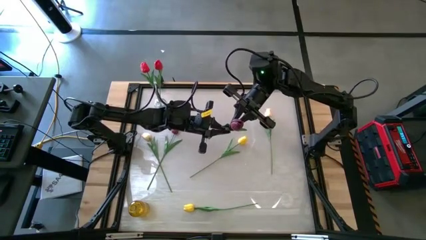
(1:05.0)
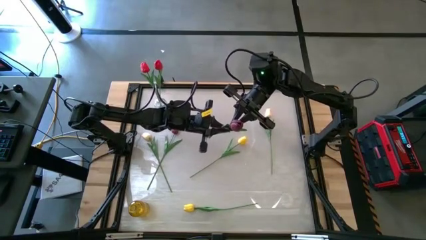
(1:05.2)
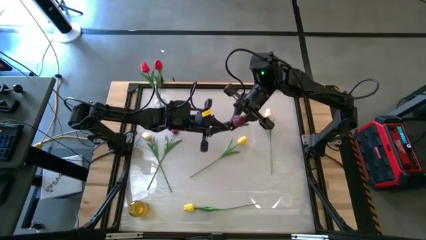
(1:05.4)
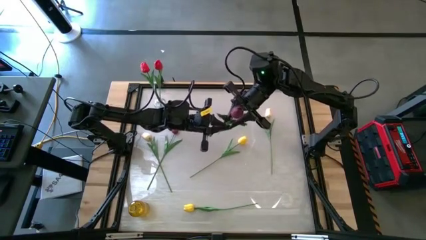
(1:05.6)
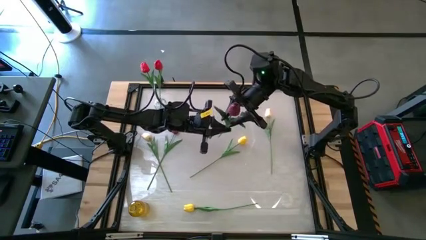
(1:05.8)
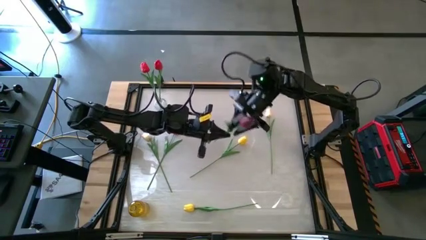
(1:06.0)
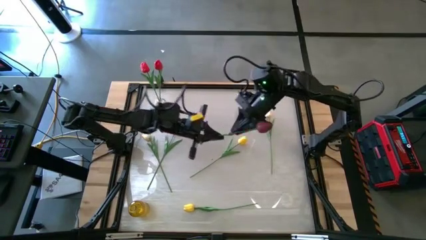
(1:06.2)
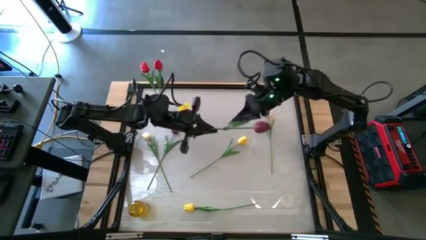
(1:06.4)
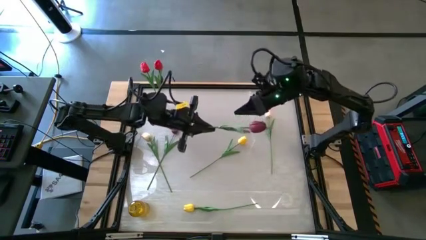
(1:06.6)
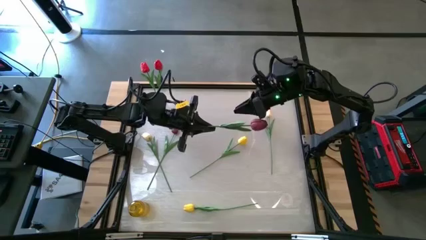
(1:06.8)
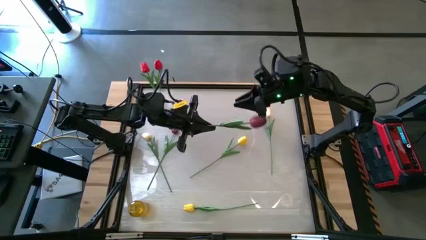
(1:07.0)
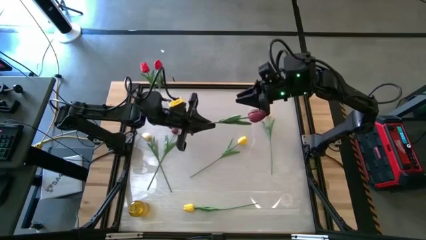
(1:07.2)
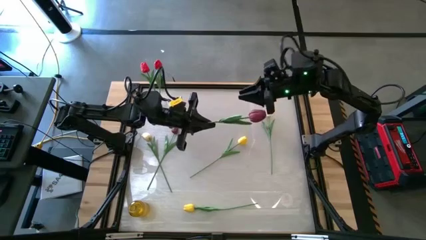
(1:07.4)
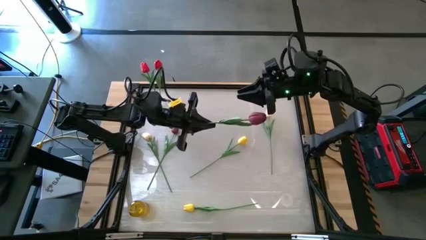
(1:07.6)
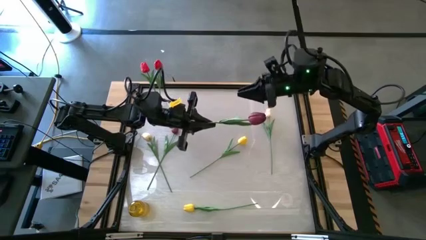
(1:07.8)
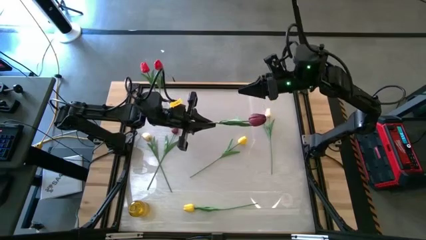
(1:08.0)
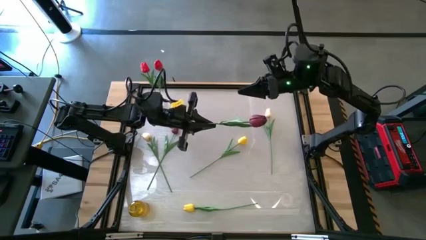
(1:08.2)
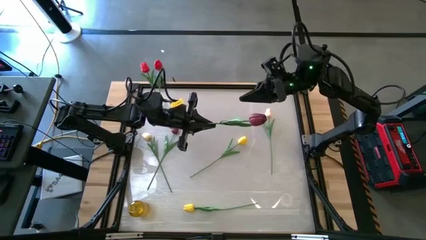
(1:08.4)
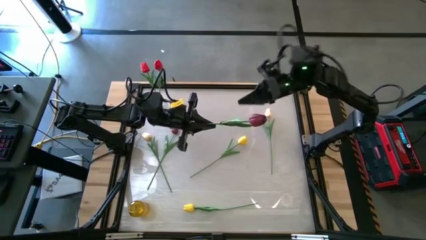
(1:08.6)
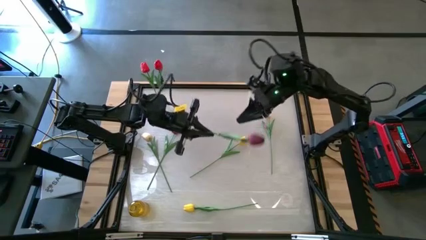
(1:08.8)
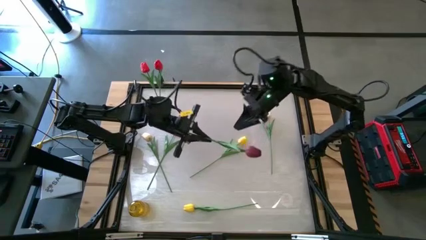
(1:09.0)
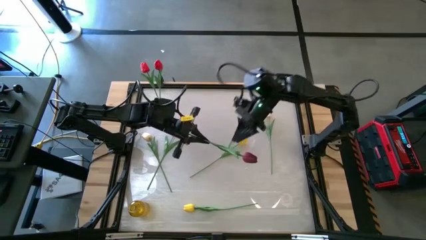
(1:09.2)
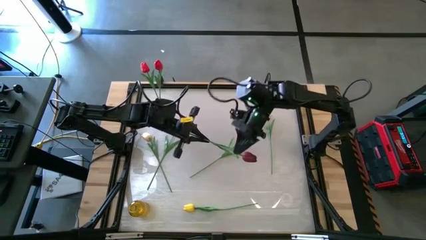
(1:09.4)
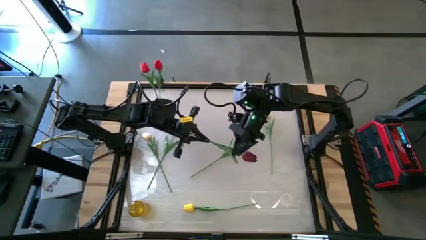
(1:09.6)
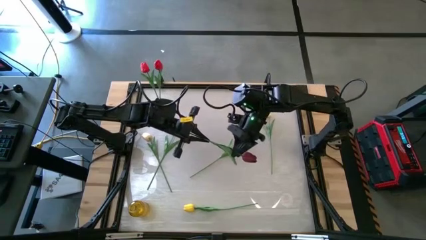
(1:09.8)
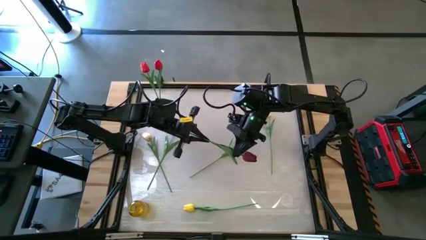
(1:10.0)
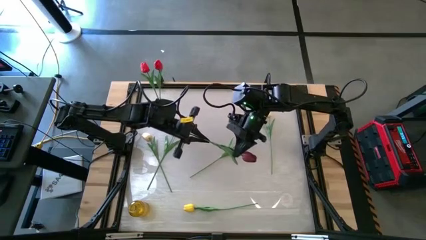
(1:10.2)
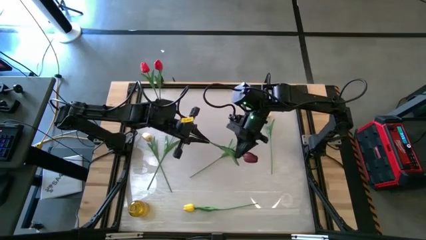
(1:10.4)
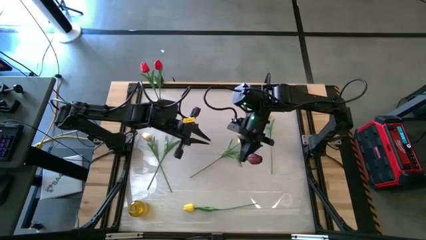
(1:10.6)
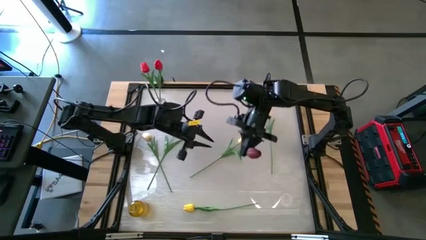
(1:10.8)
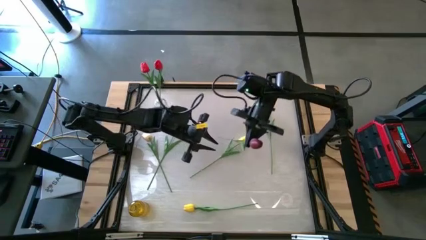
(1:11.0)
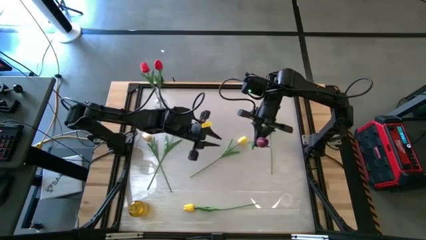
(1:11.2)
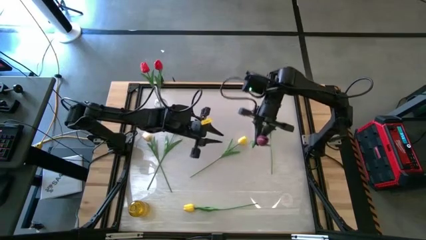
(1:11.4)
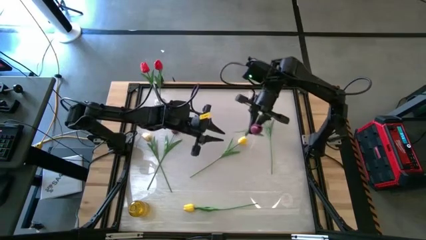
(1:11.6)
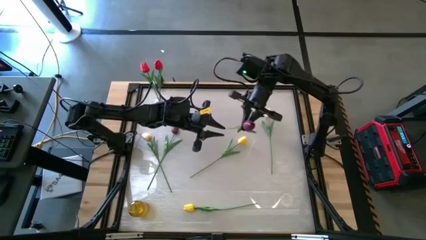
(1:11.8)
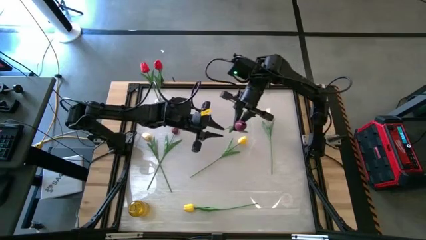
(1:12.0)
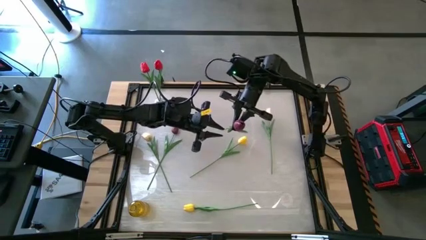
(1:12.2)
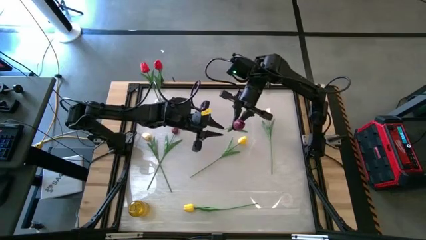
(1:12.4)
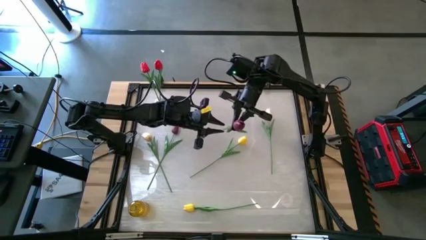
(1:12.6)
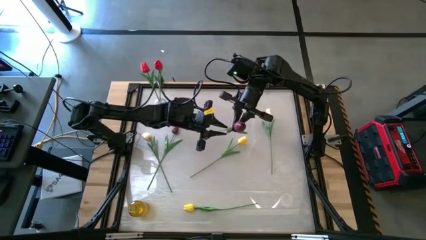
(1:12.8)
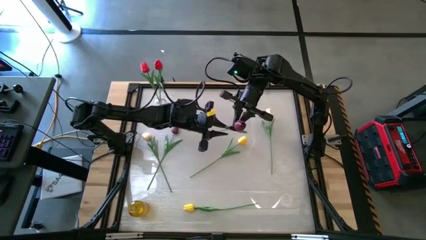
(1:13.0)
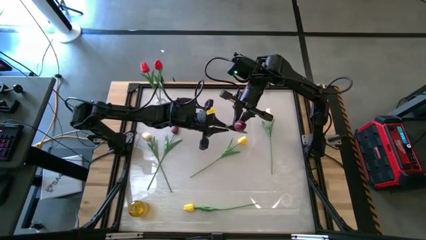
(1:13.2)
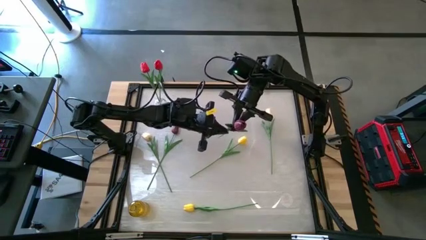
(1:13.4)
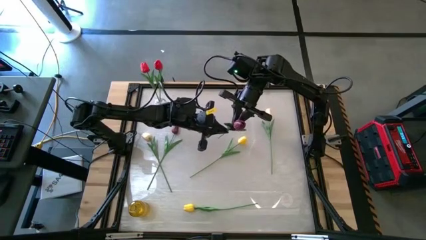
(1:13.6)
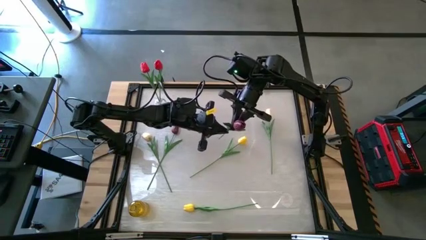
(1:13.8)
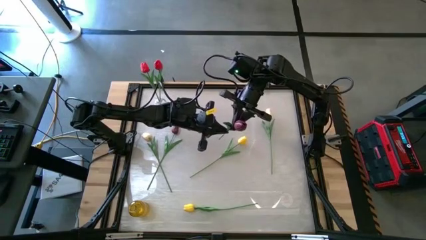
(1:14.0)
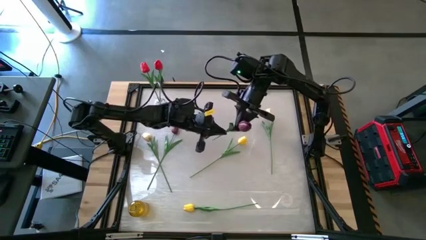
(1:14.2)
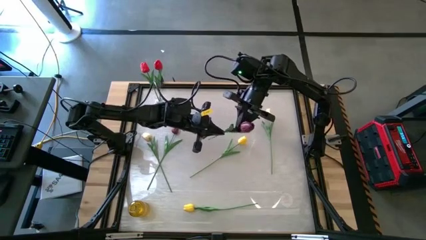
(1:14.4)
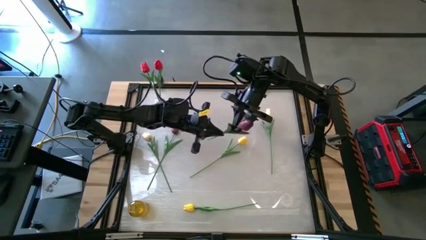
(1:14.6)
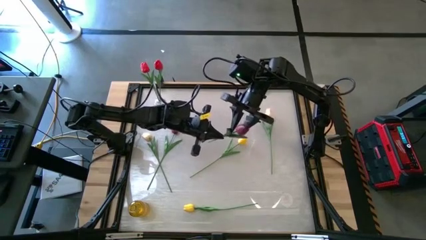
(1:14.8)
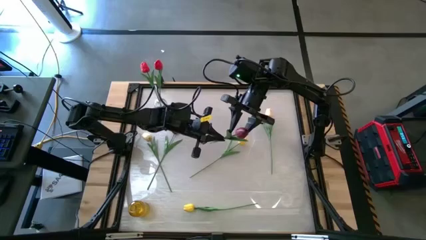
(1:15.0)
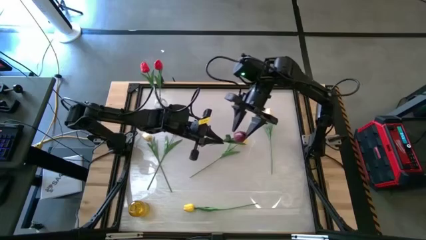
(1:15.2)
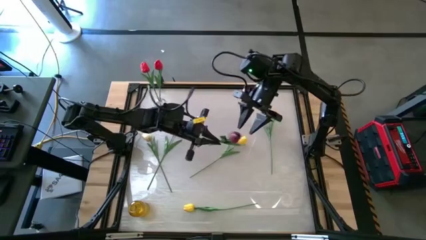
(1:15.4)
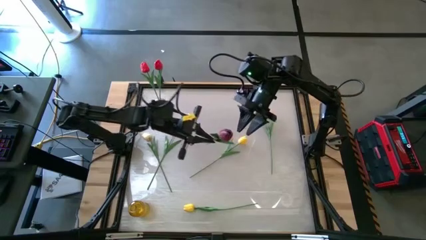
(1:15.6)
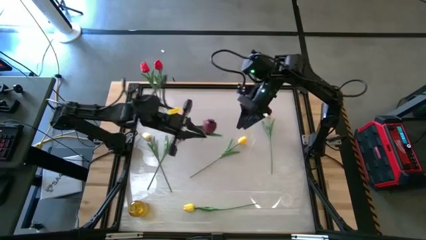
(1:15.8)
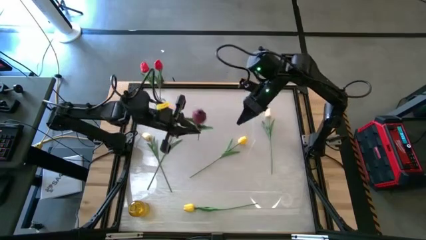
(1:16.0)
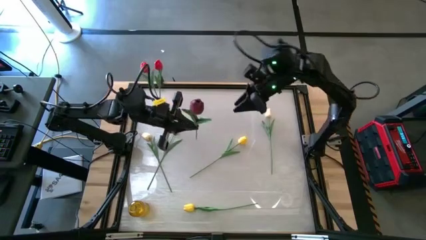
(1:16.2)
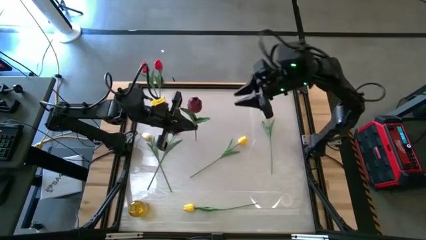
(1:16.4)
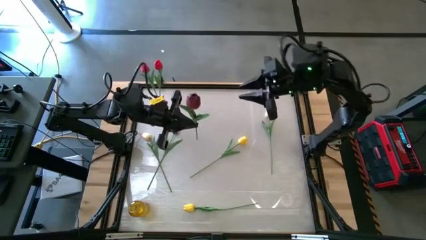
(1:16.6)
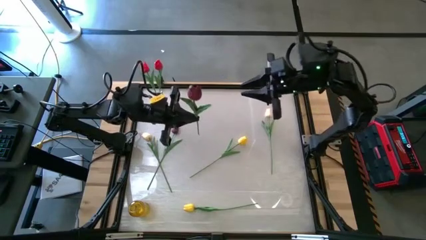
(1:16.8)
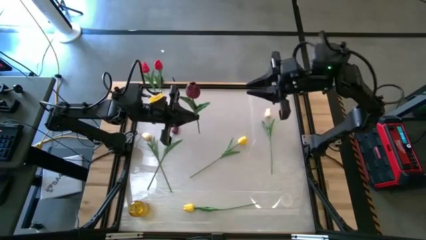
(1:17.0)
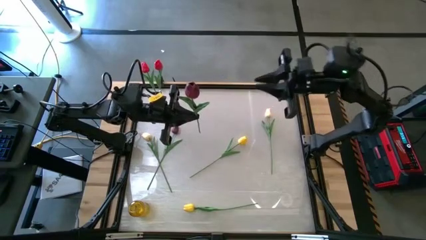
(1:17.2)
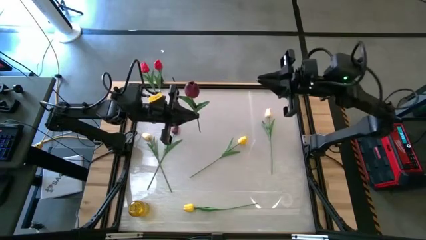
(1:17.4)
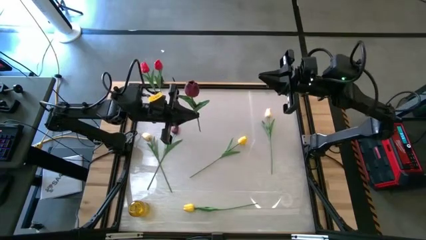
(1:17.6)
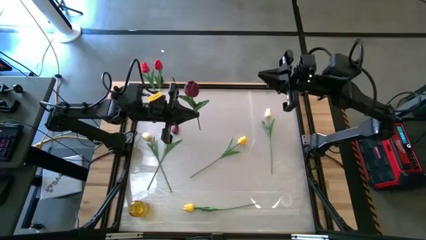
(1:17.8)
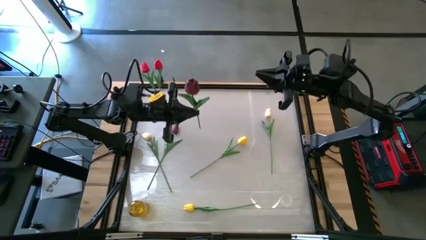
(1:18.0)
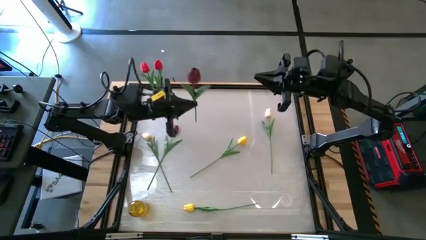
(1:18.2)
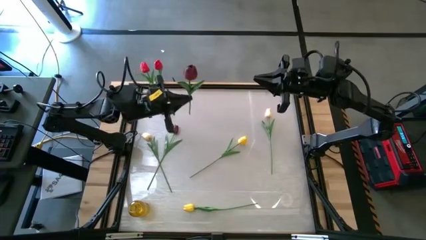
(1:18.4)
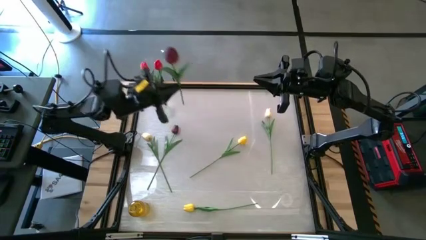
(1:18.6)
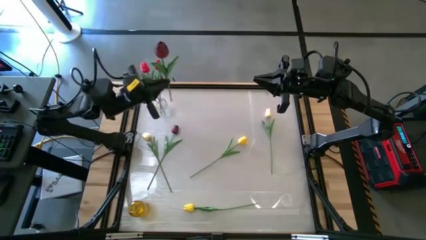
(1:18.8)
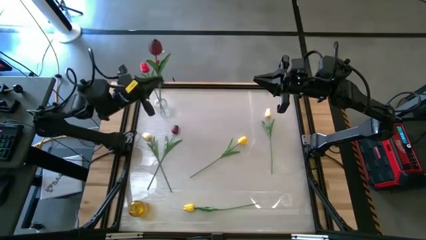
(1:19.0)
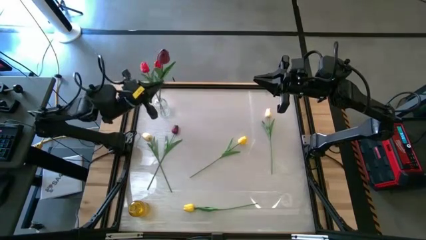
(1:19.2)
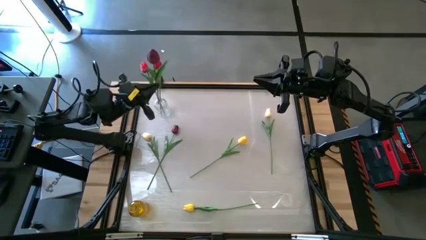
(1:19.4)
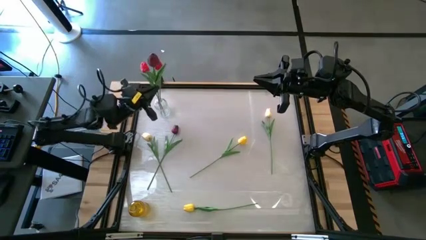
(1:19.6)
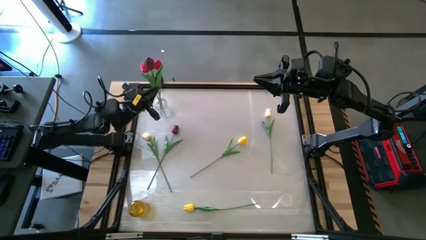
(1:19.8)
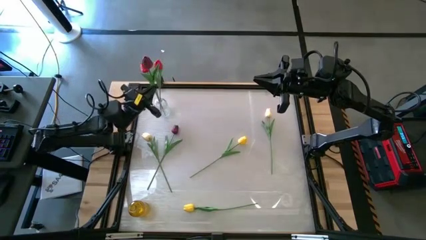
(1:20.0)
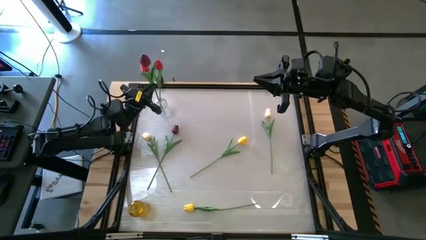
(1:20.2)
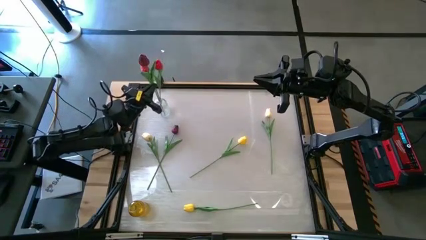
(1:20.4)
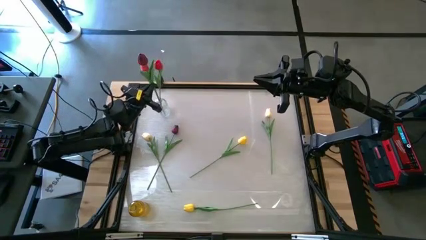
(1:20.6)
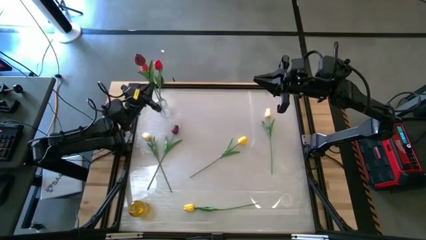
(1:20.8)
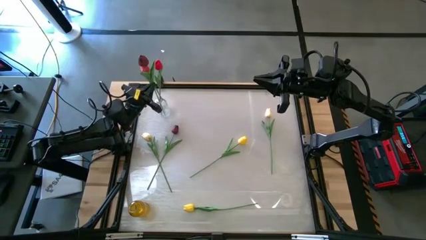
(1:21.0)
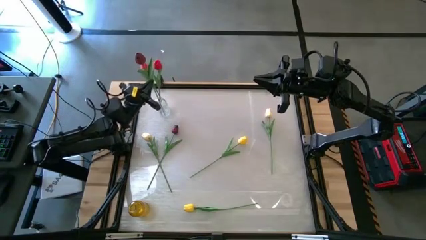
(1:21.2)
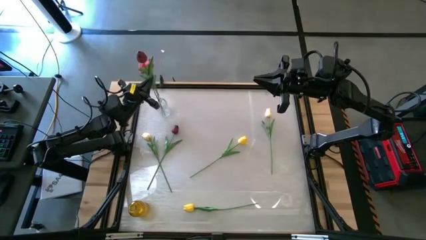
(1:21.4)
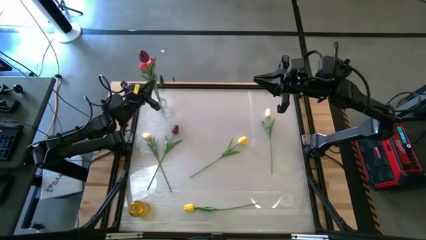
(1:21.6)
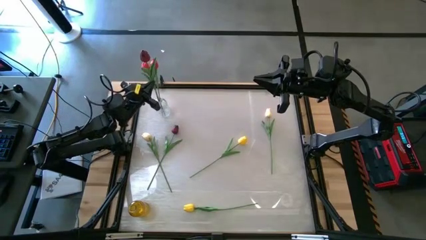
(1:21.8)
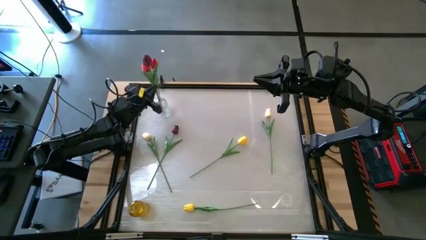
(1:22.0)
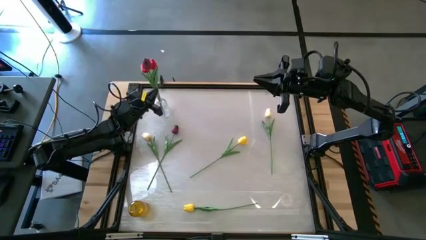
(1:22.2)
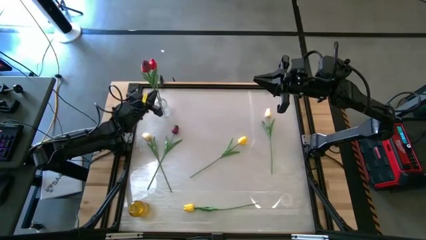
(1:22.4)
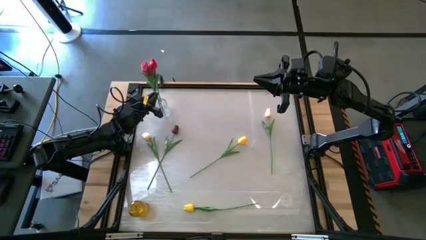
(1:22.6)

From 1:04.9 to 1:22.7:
Task: Sort flowers into vase by color
Put the right dark red flower into the transparent vase
